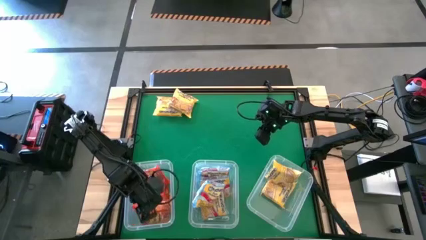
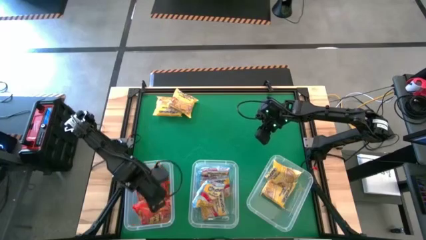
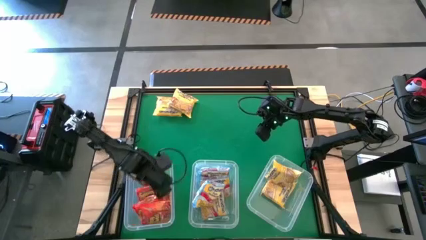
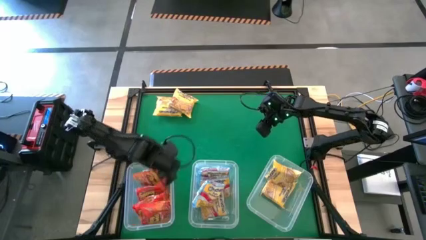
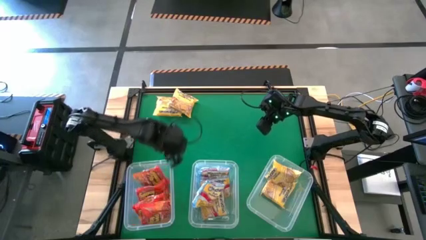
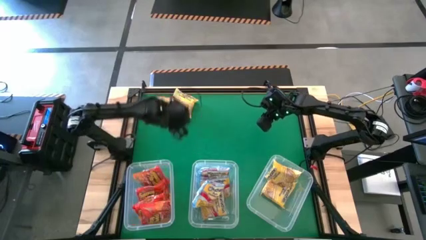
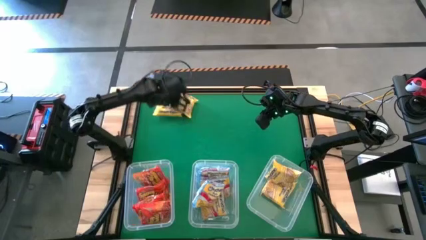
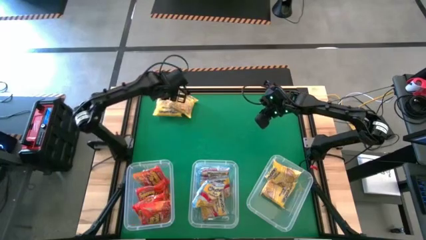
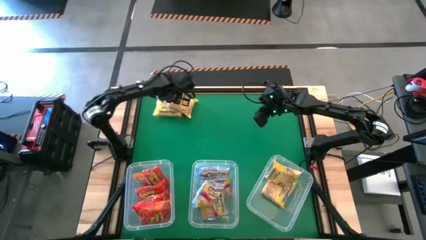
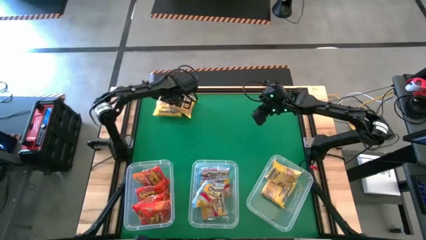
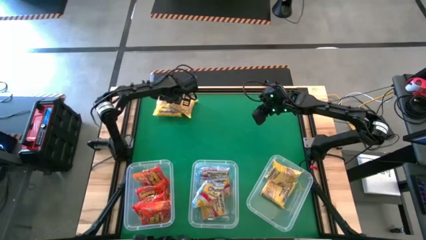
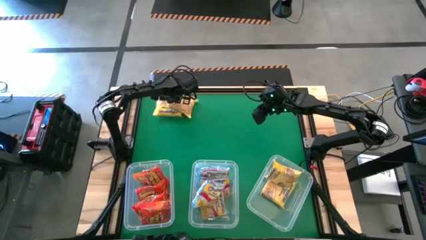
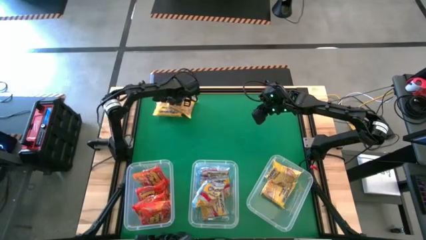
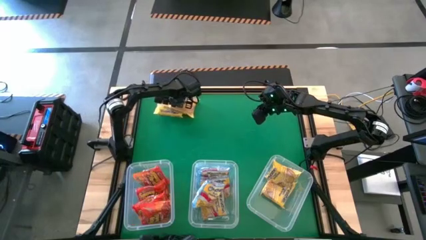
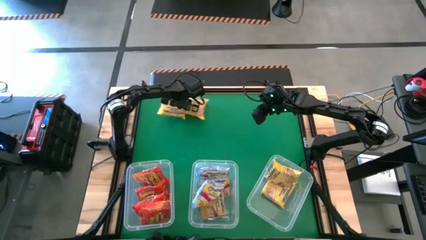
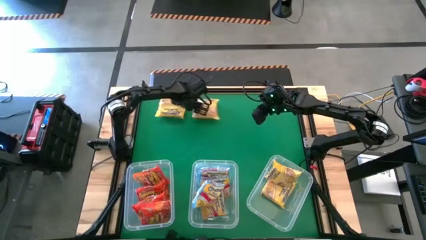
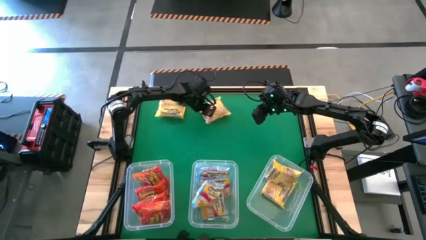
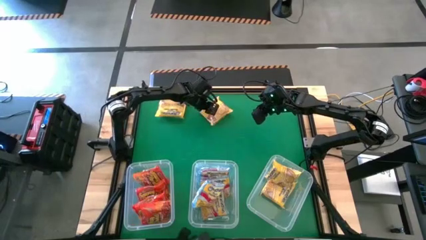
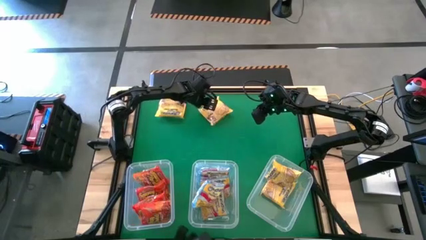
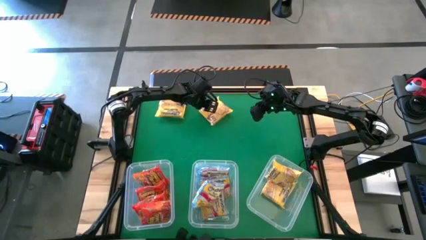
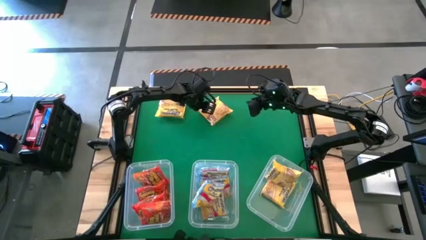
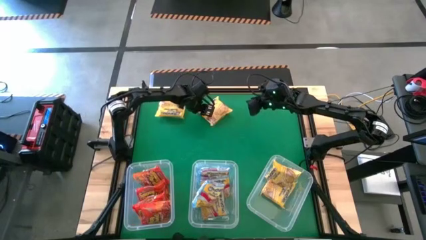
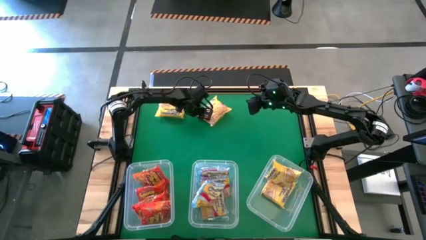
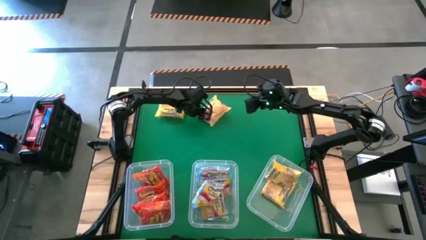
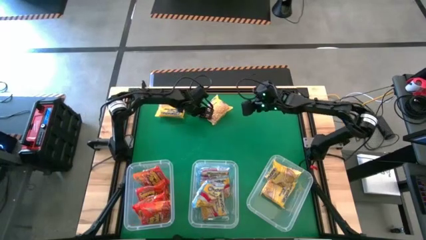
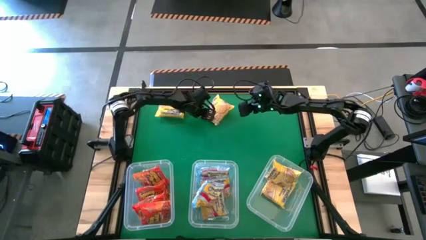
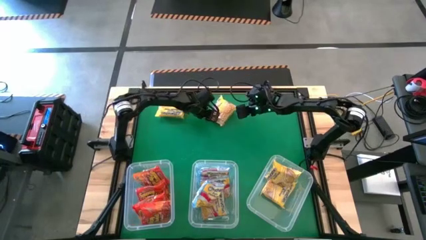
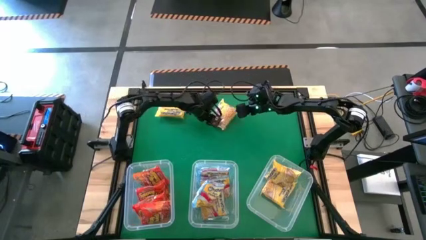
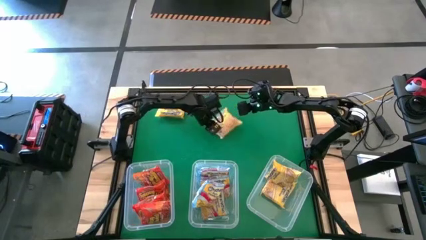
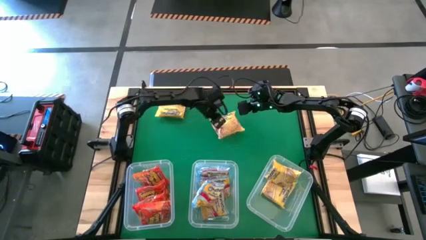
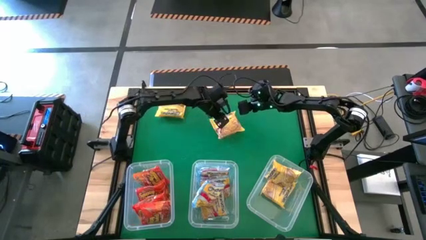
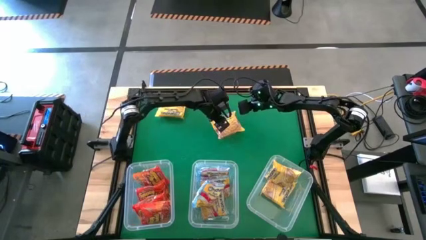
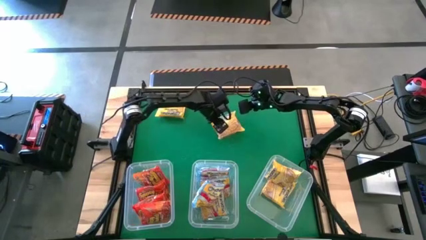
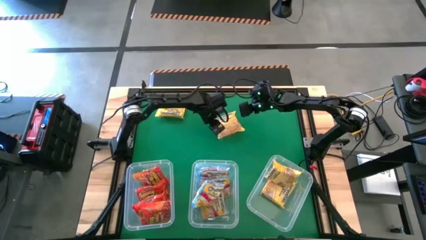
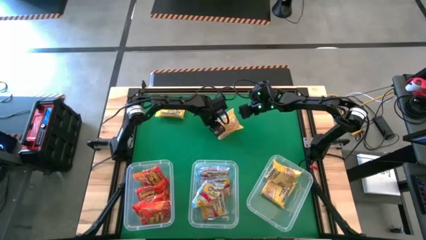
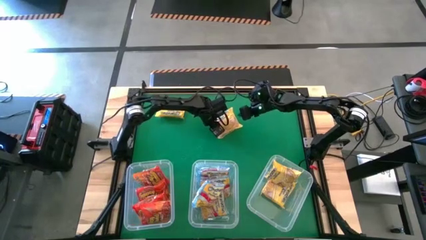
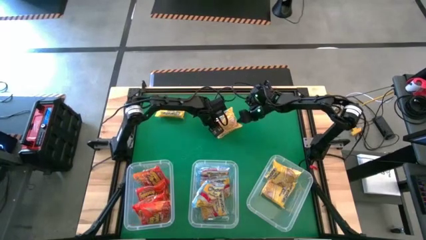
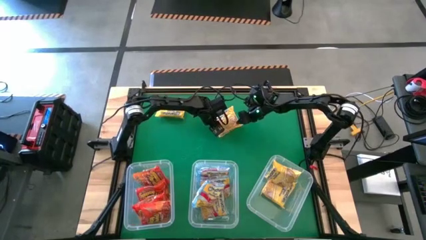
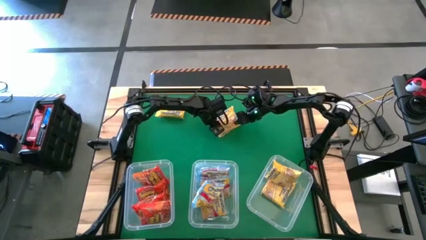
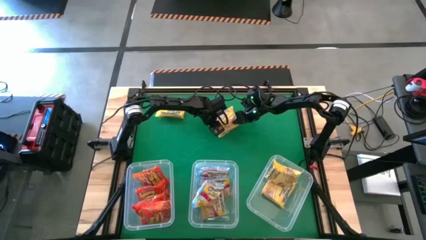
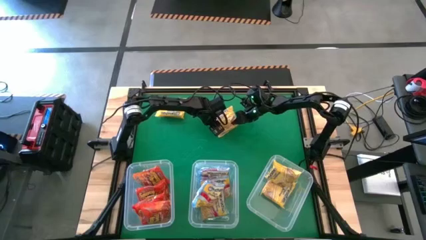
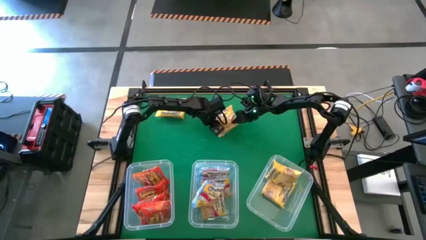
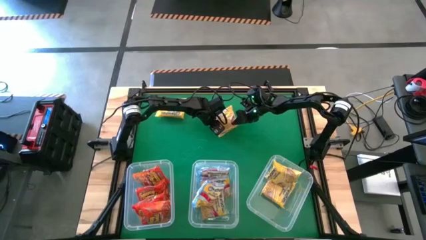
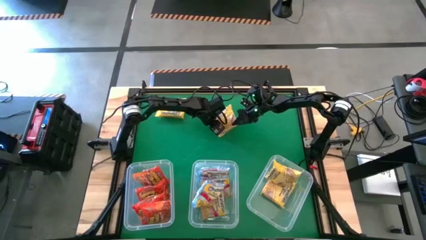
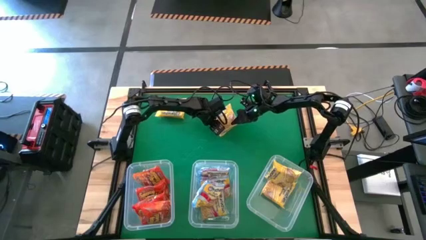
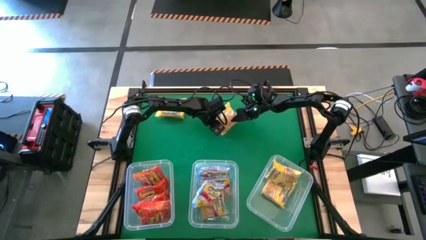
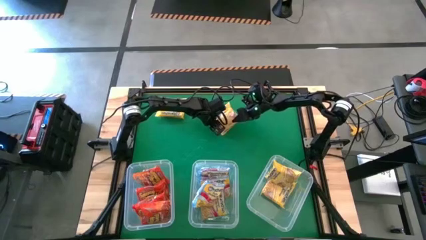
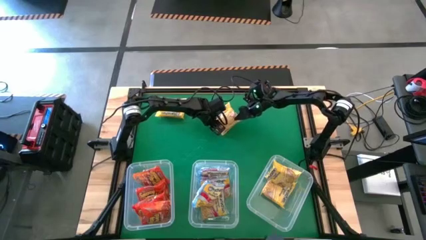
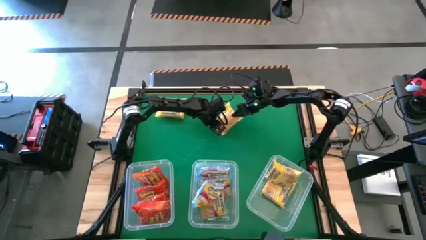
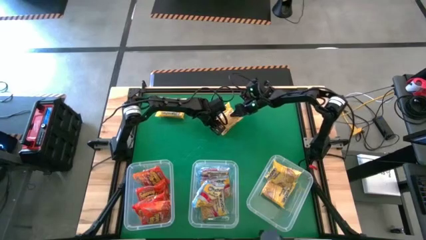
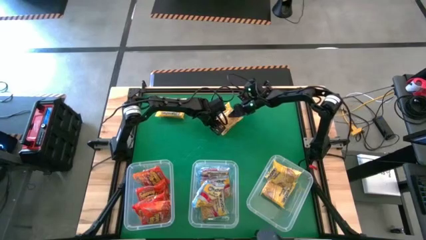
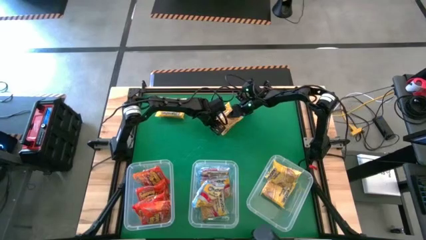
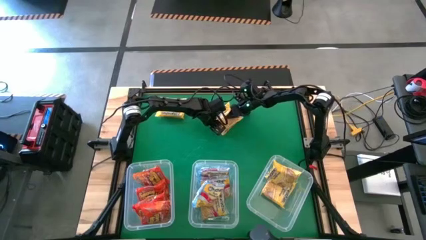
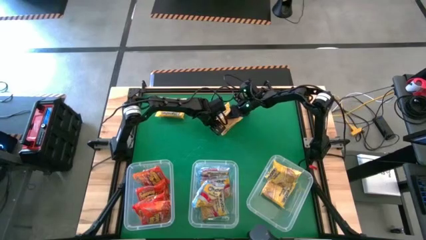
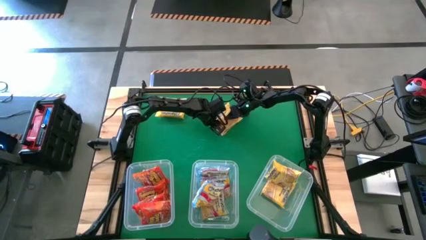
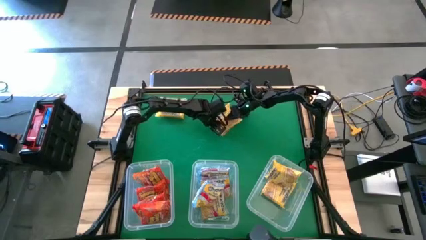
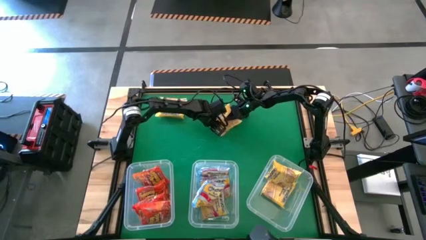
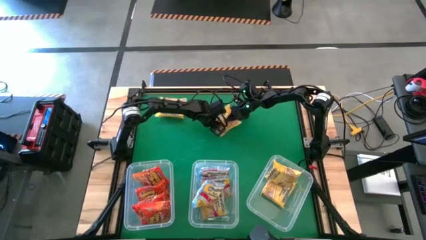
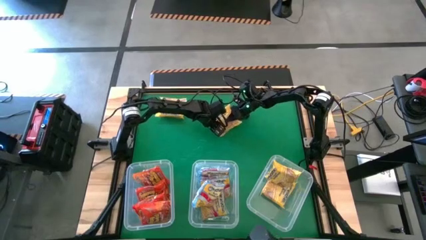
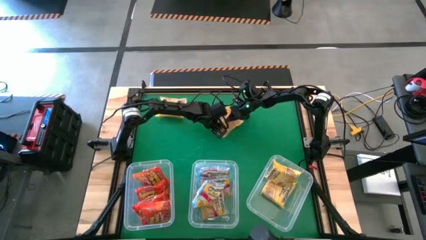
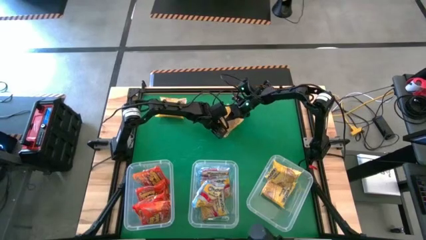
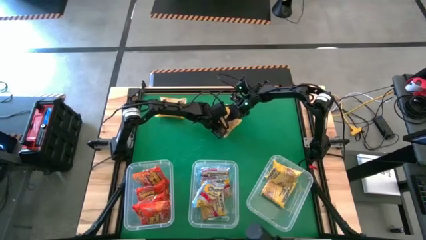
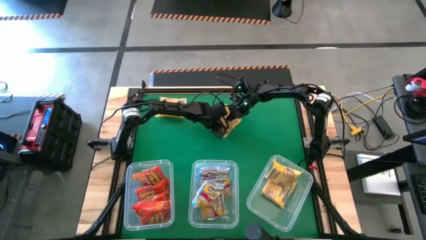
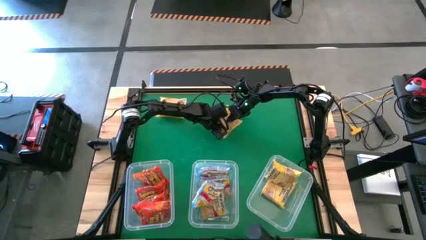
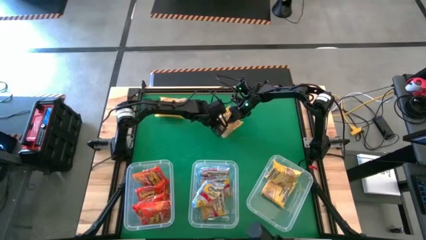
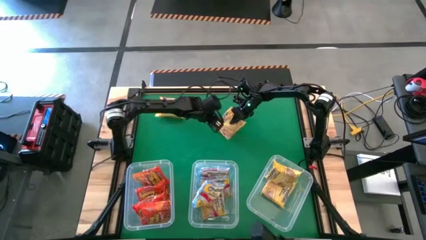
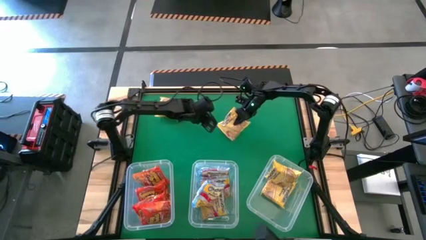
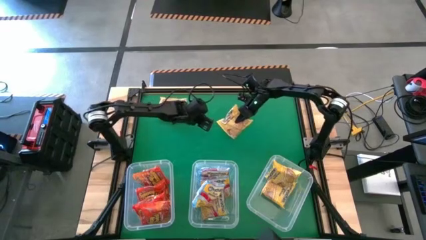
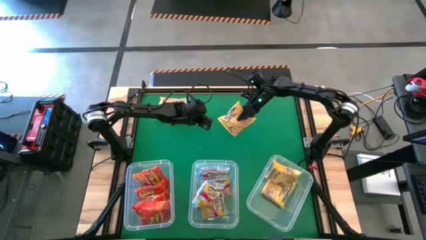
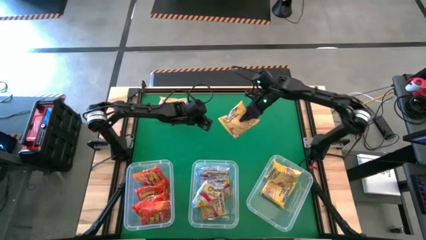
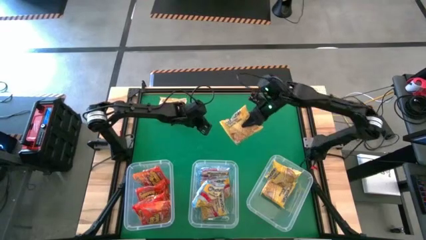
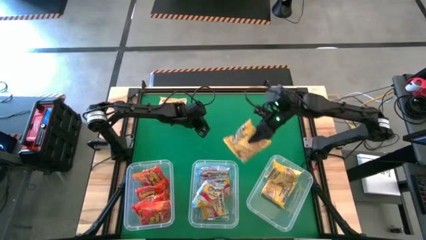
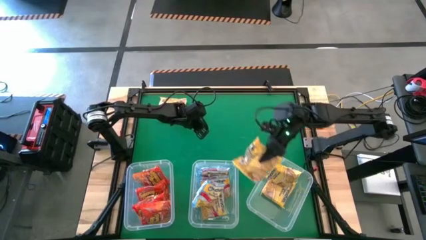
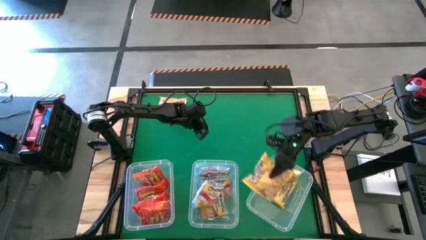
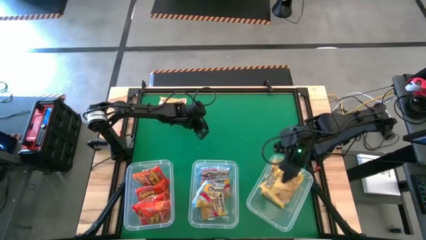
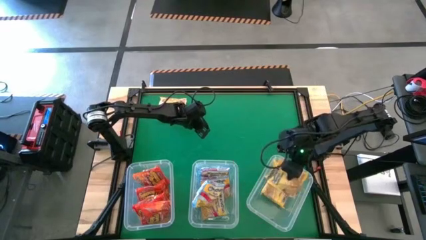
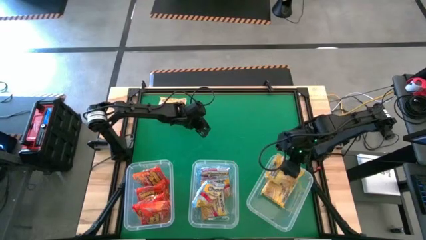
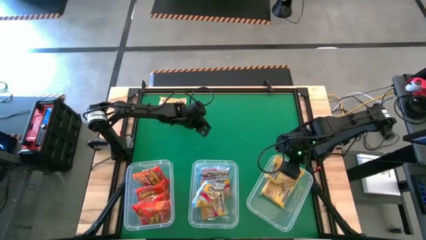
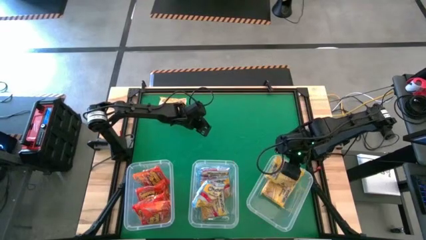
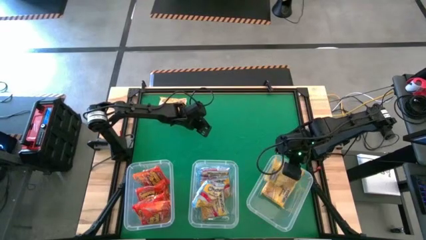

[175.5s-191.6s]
Task: Sort Maruchan noodles
Put the yellow noodle pack into the right transparent bin
